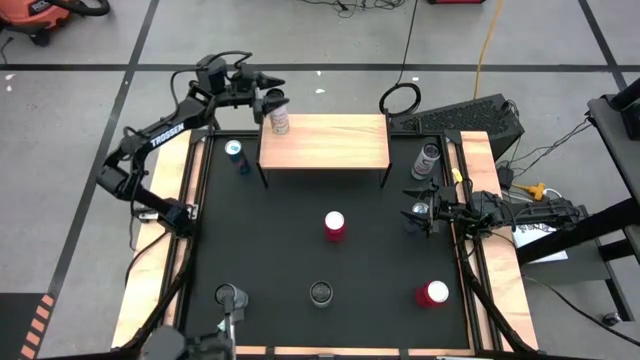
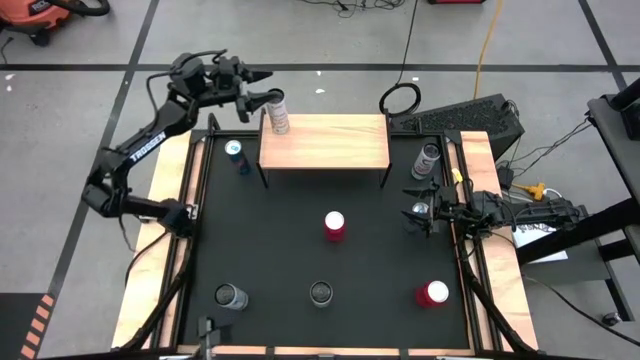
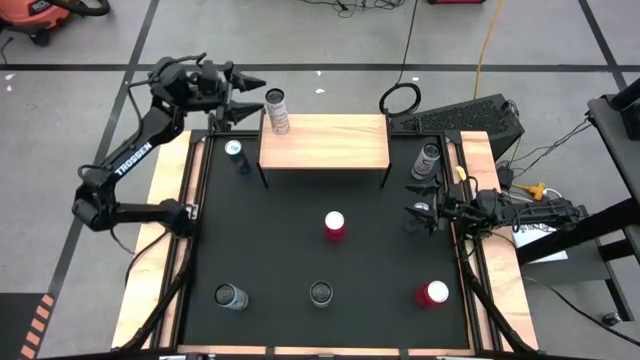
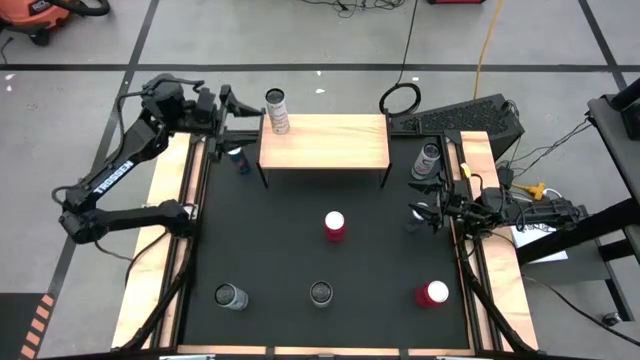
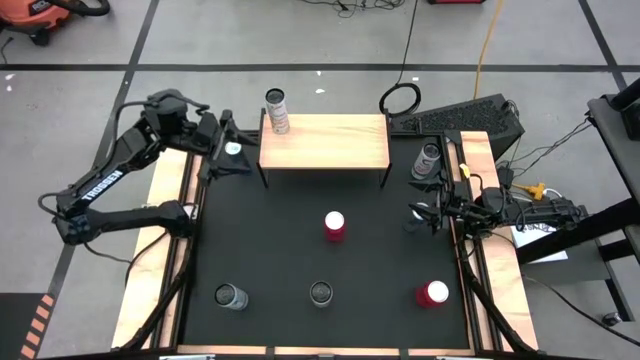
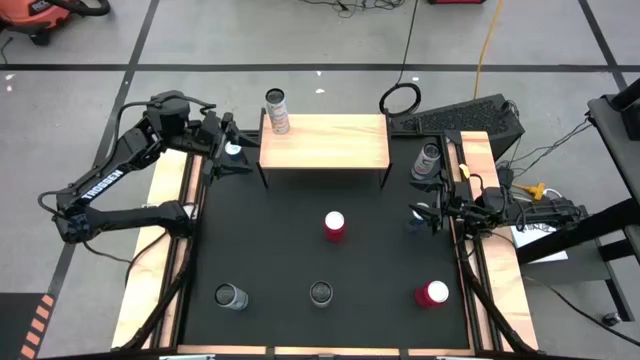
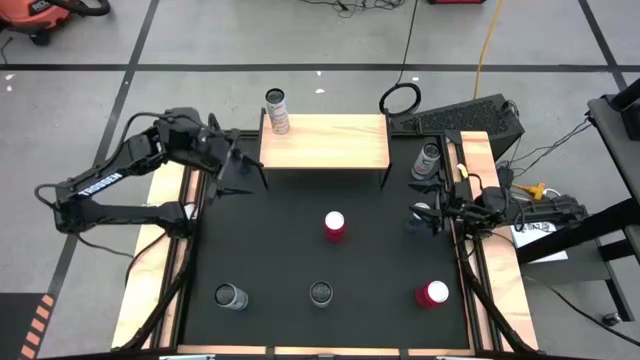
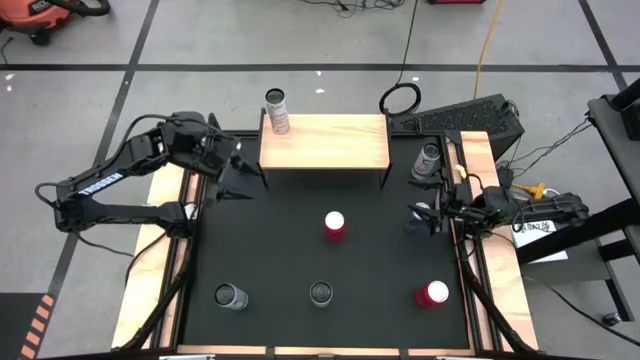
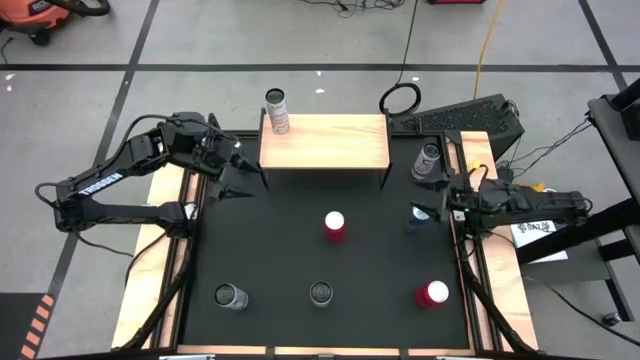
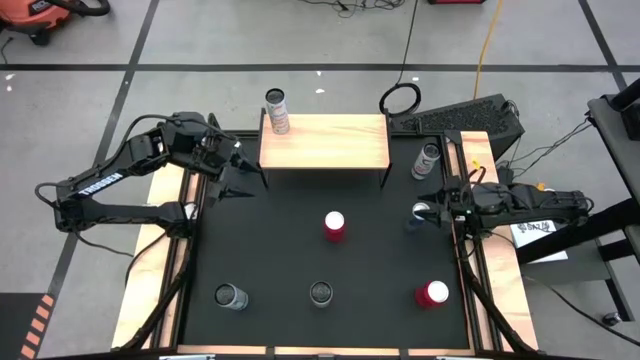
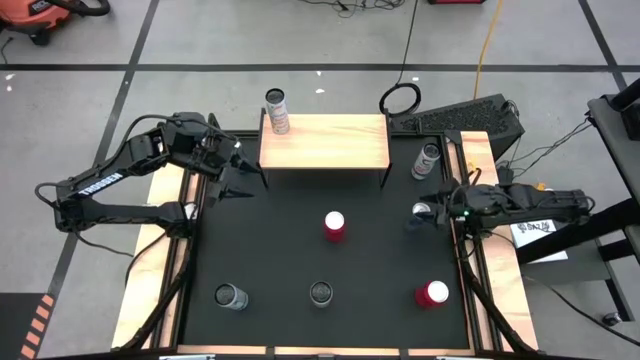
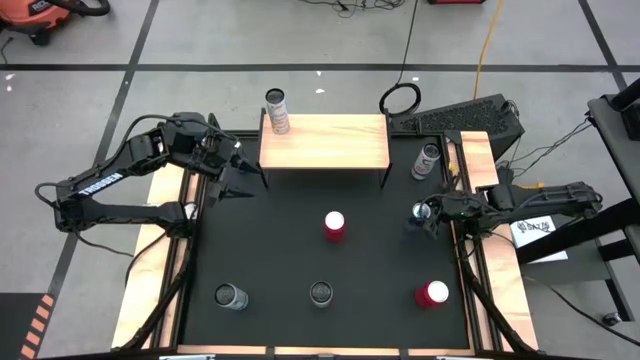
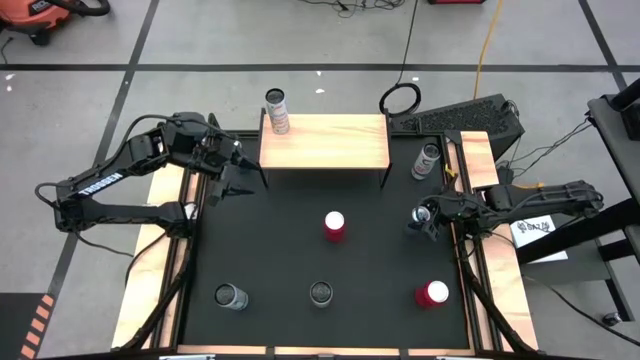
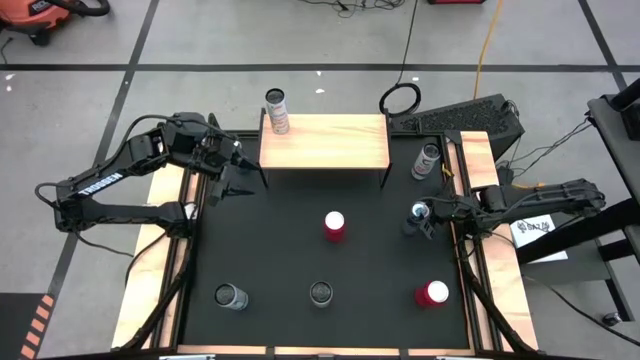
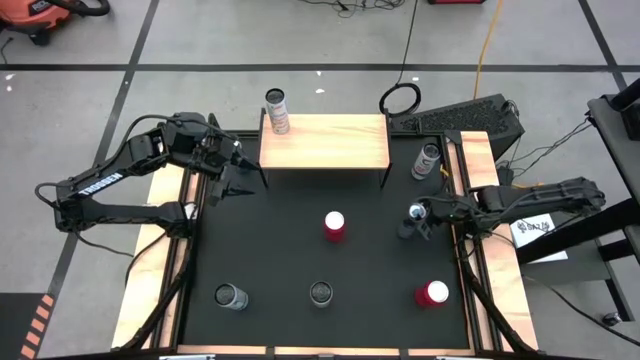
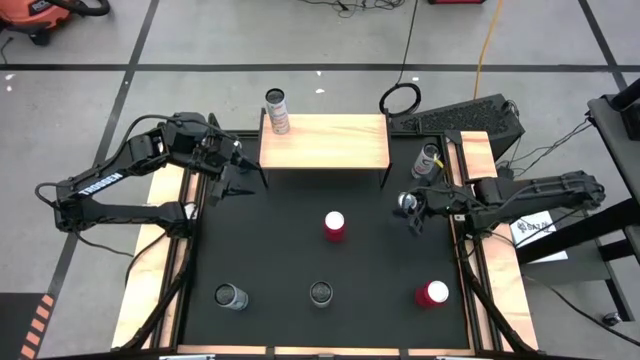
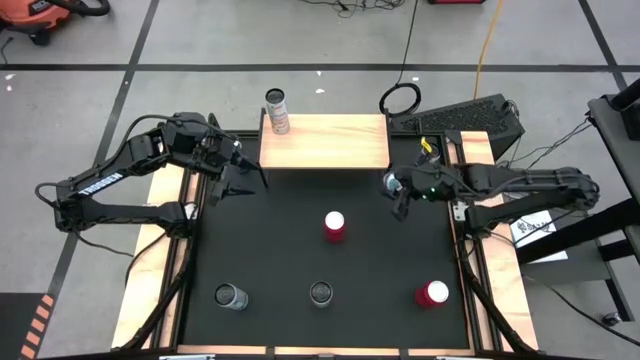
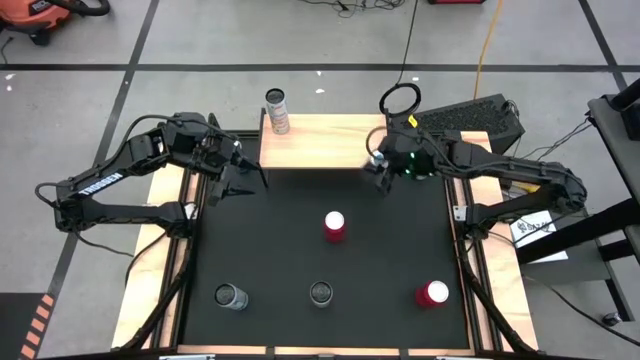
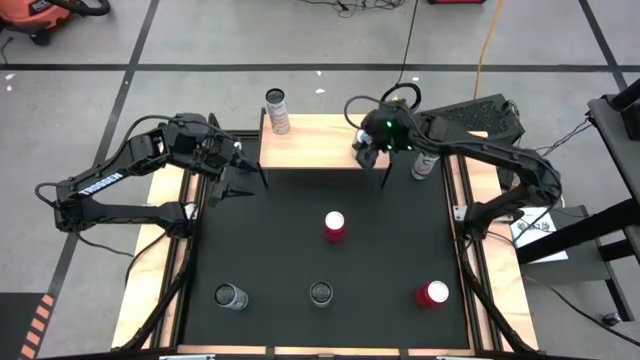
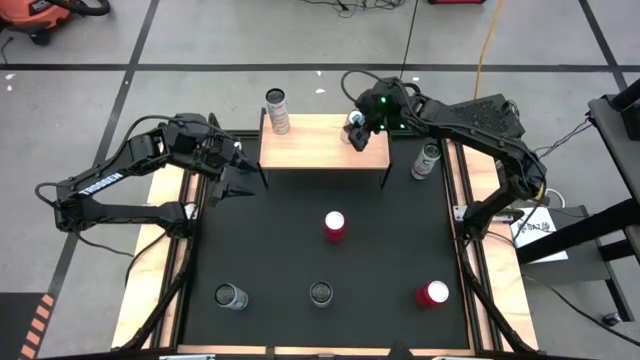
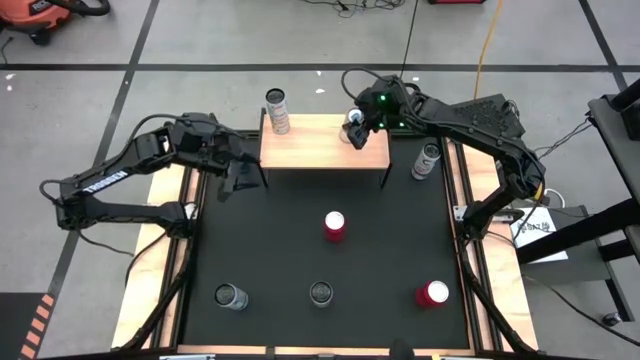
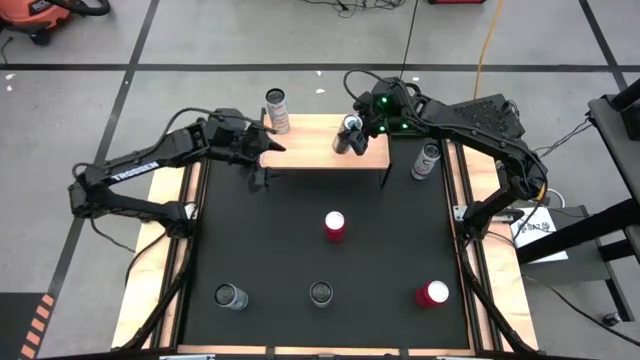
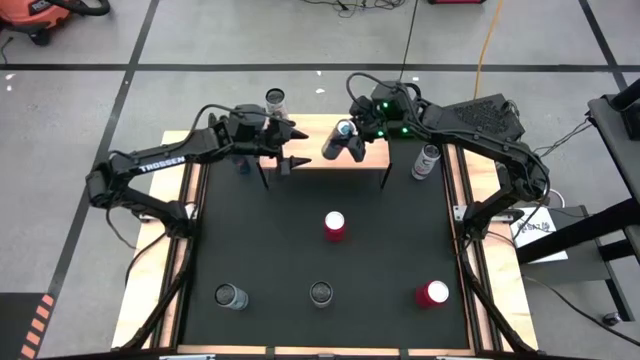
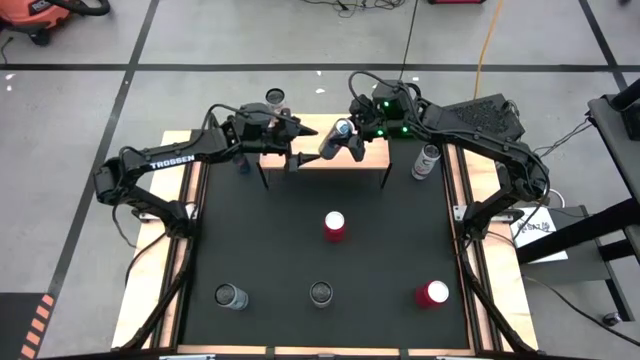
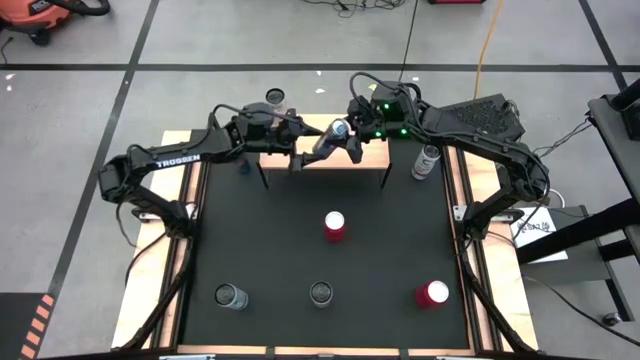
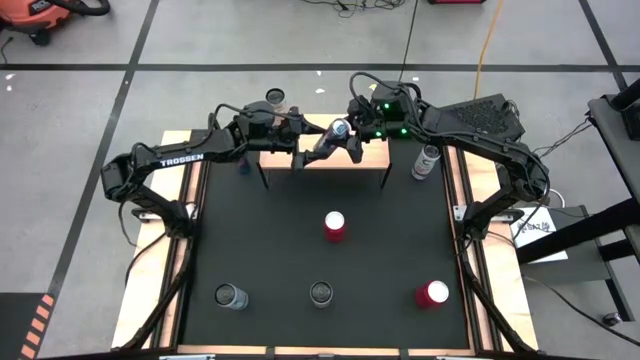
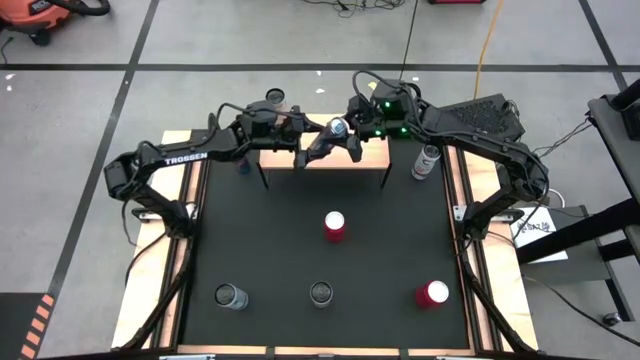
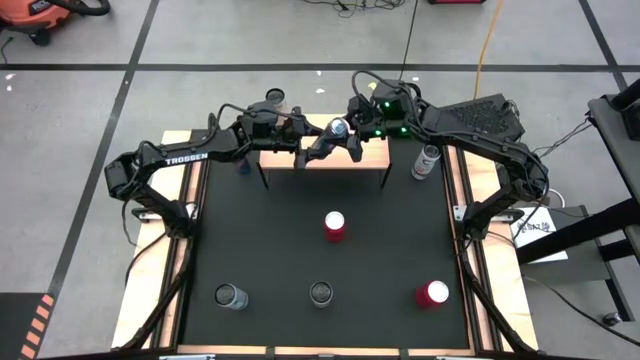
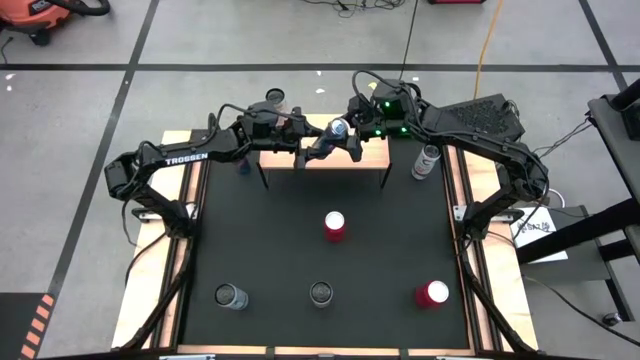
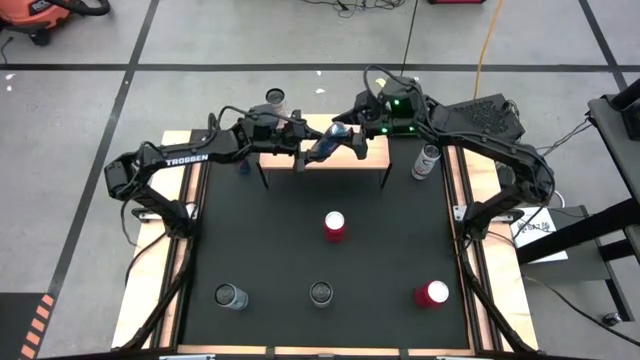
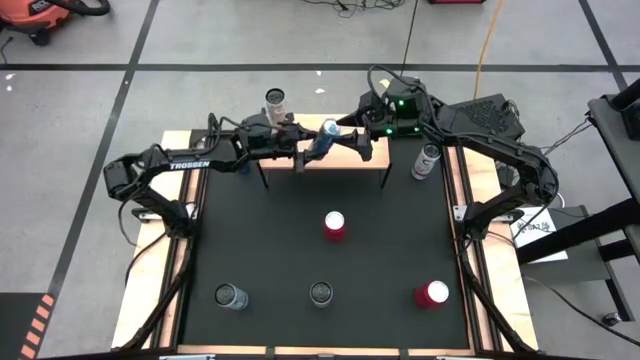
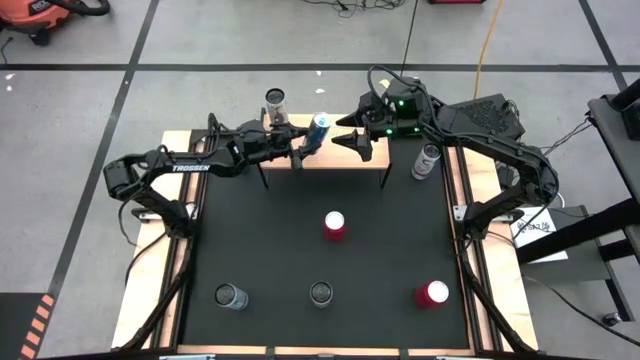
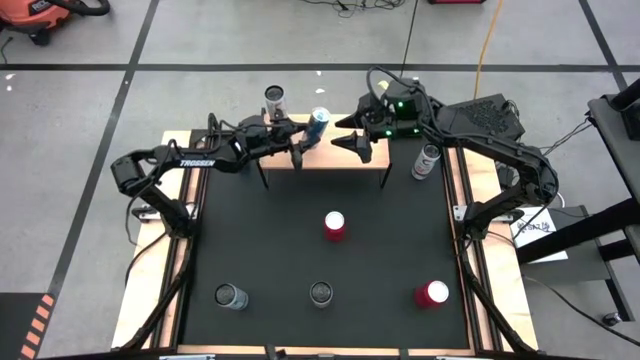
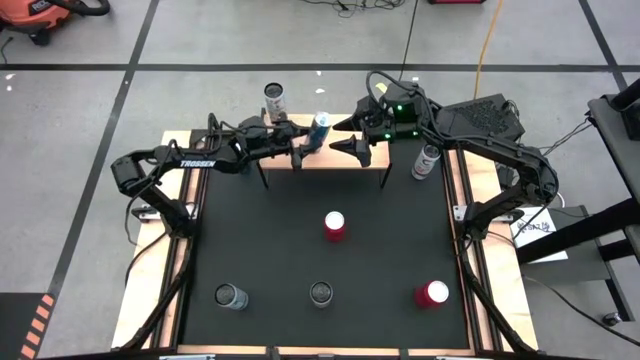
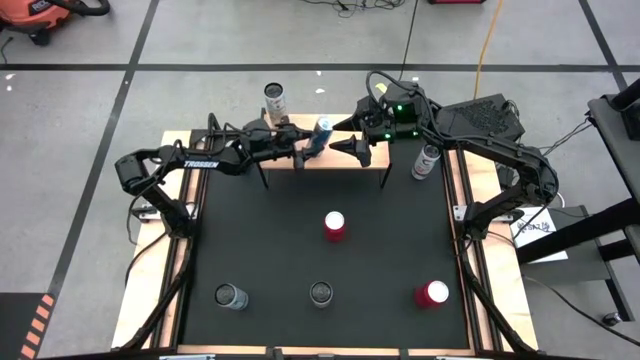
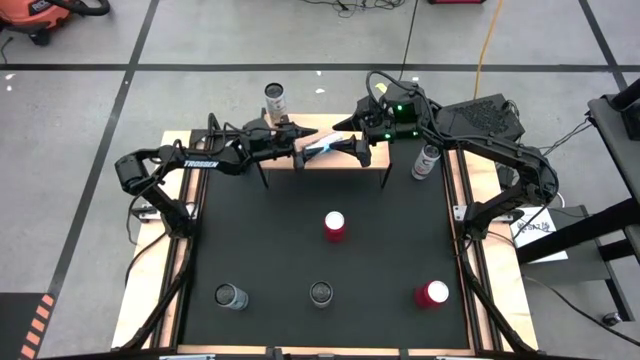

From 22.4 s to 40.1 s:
Task: Place canned beverage on shelf
Put the right blue soda can on the shelf

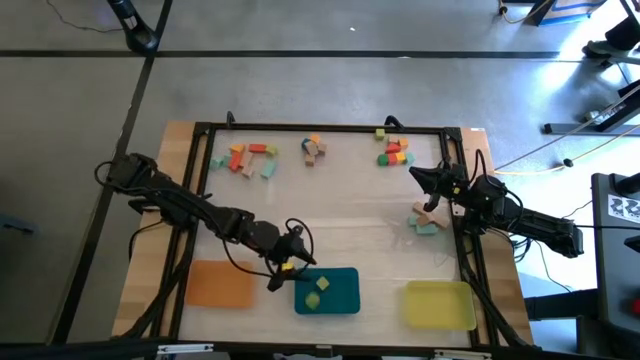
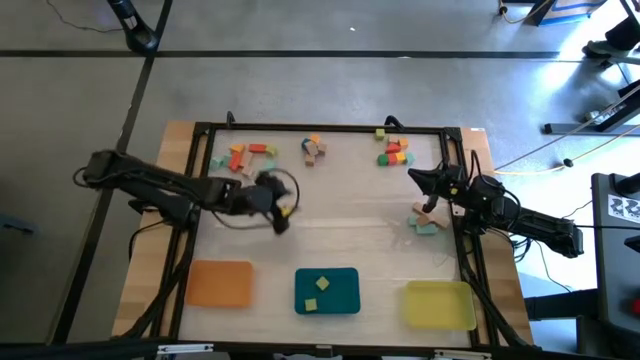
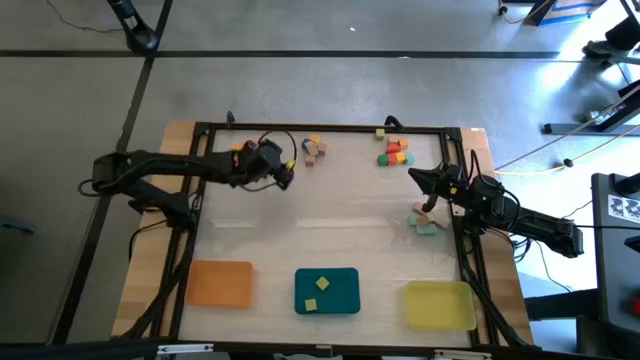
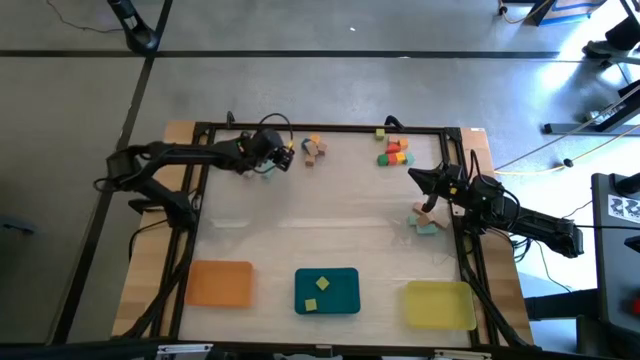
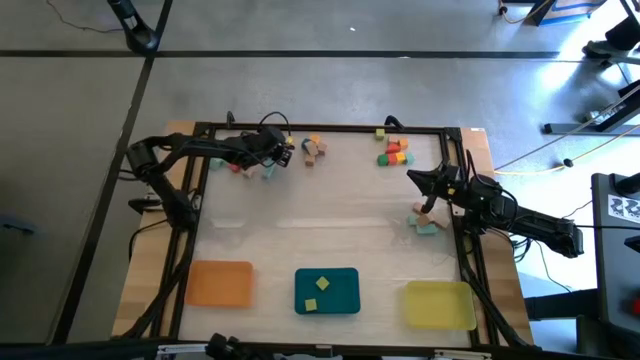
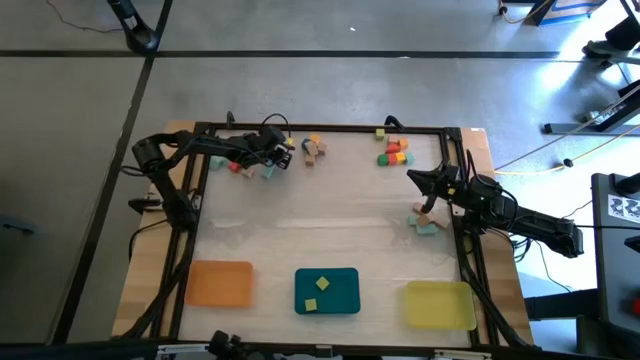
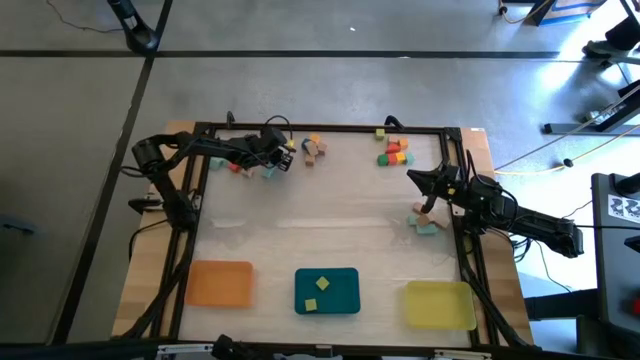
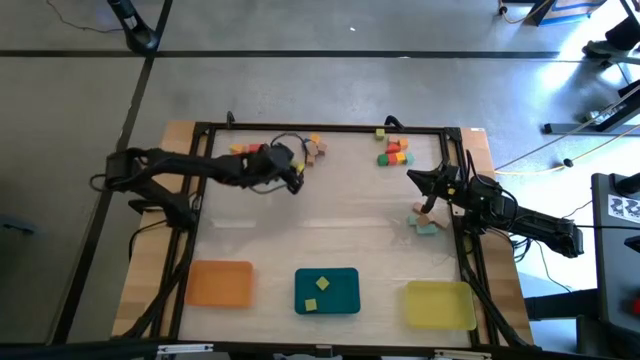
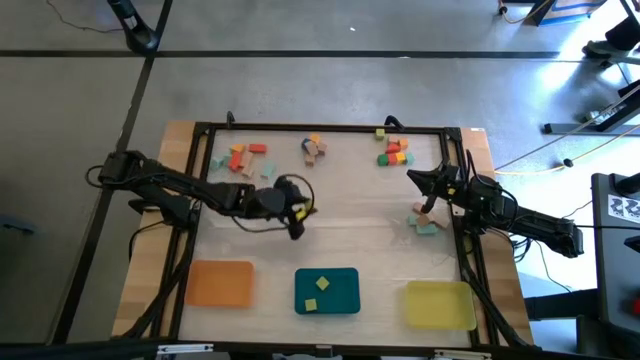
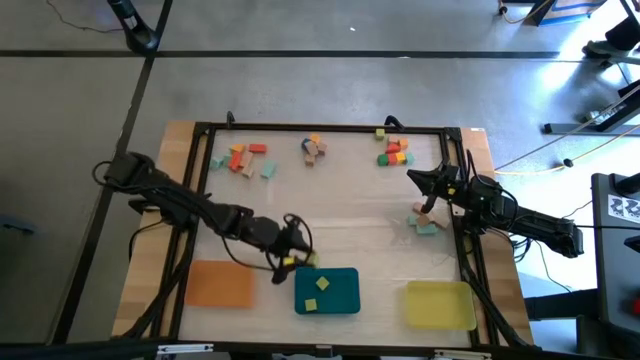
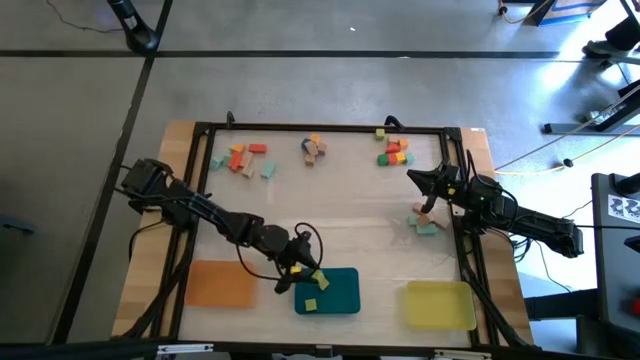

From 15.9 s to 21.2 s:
Task: Sort blocks by size
Put the light green cube block into the blue bin
